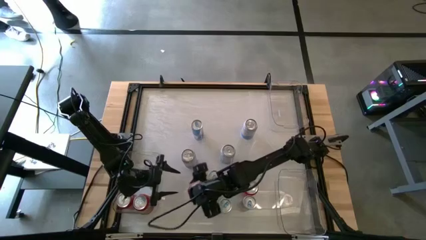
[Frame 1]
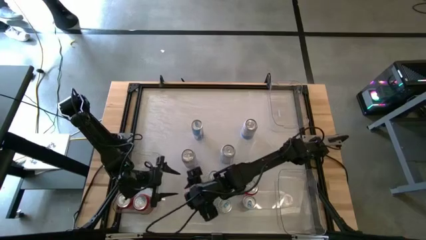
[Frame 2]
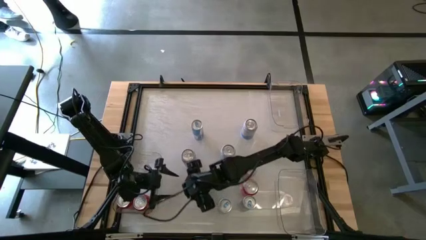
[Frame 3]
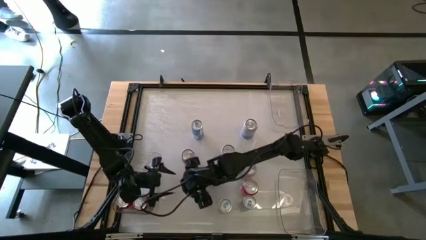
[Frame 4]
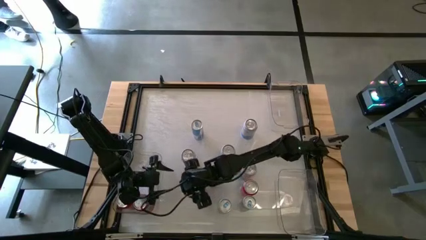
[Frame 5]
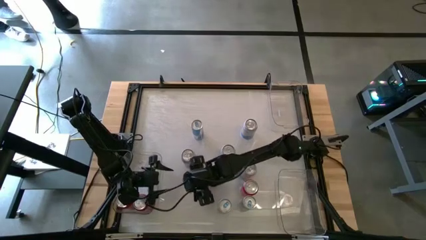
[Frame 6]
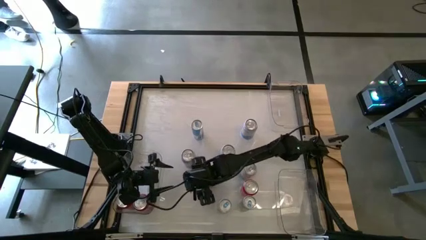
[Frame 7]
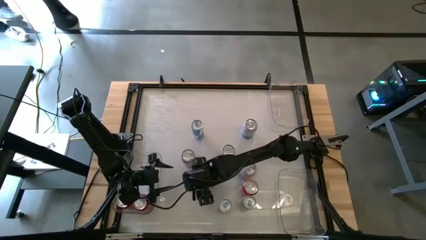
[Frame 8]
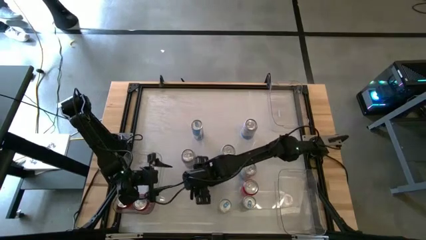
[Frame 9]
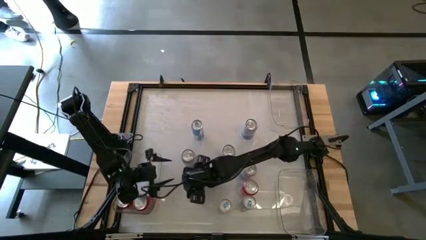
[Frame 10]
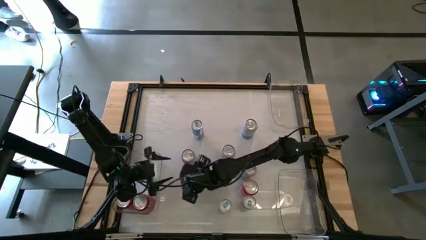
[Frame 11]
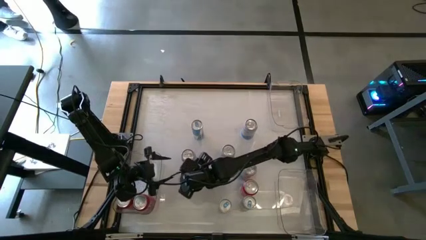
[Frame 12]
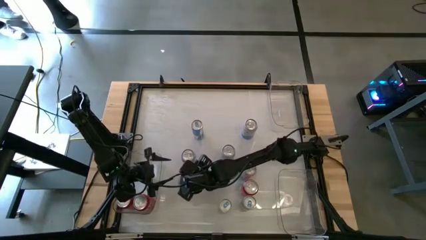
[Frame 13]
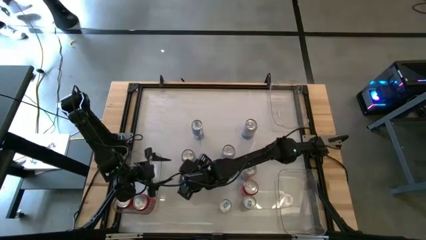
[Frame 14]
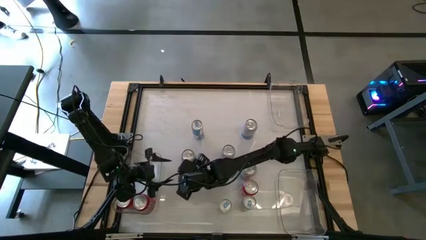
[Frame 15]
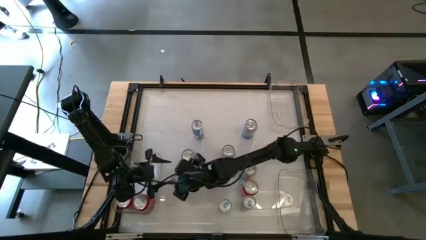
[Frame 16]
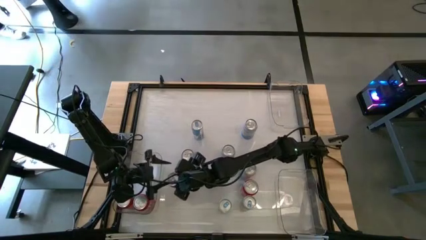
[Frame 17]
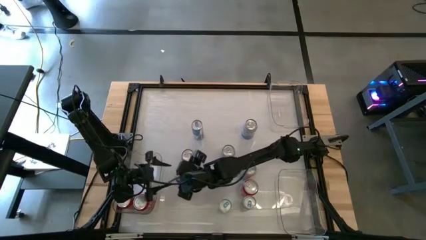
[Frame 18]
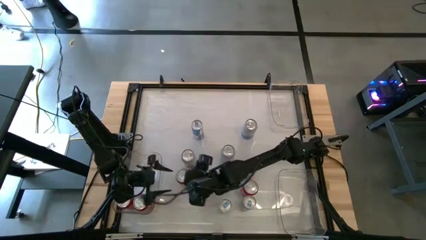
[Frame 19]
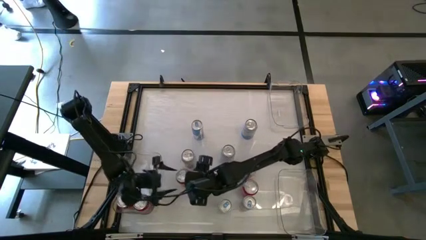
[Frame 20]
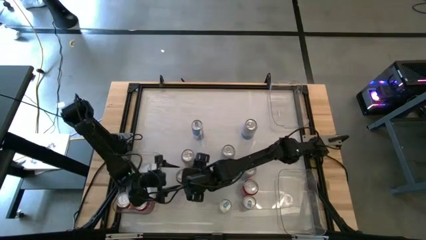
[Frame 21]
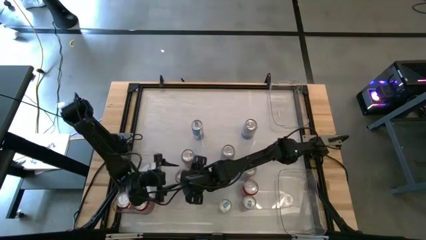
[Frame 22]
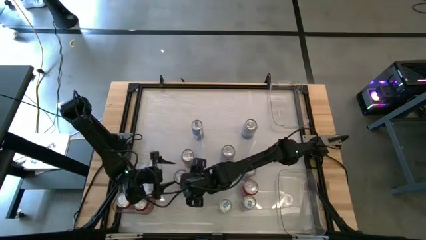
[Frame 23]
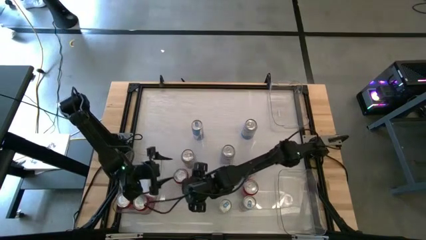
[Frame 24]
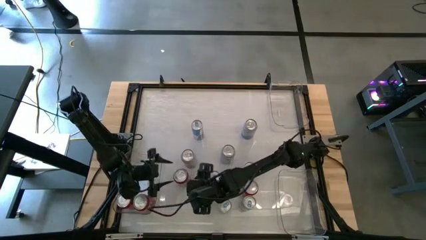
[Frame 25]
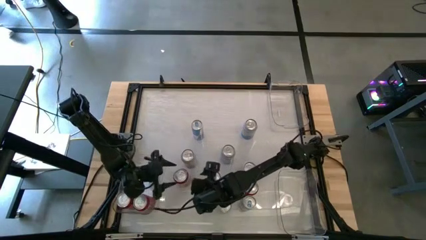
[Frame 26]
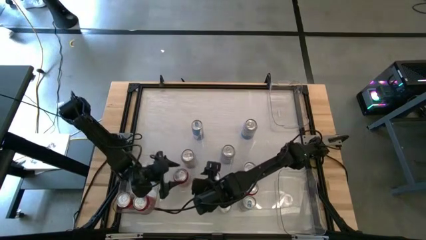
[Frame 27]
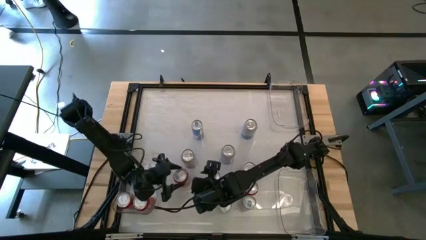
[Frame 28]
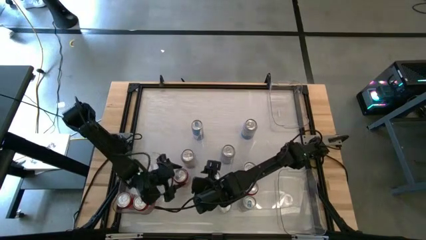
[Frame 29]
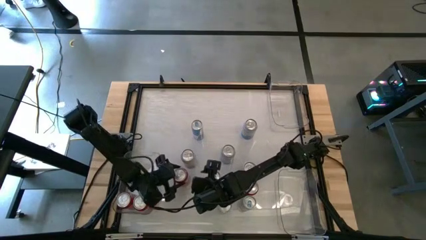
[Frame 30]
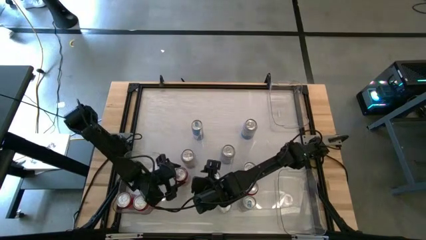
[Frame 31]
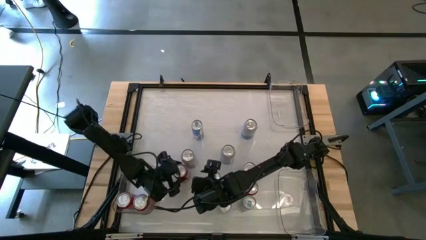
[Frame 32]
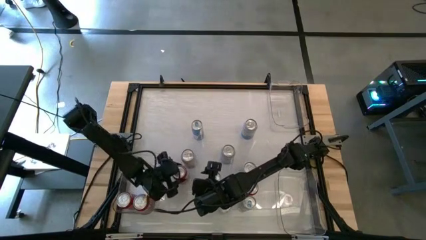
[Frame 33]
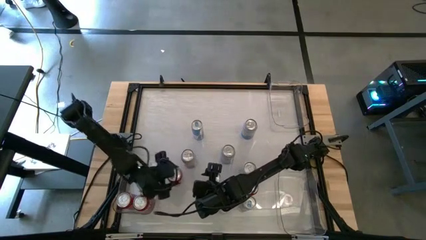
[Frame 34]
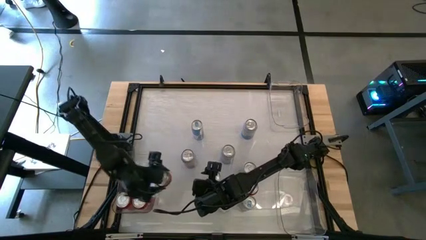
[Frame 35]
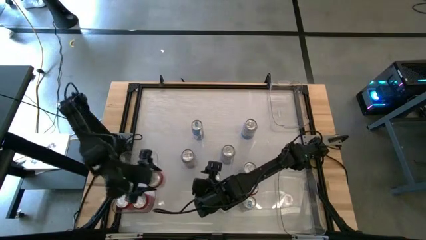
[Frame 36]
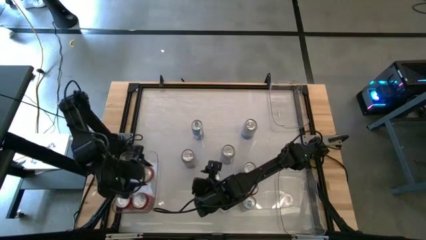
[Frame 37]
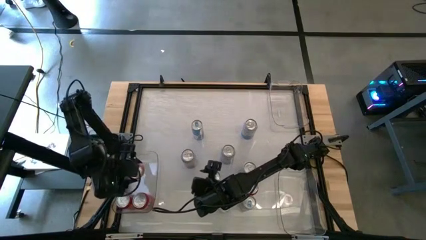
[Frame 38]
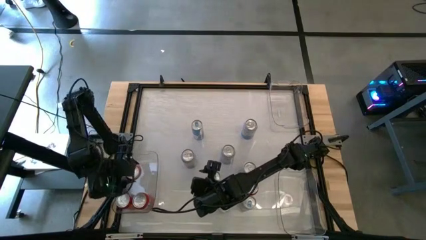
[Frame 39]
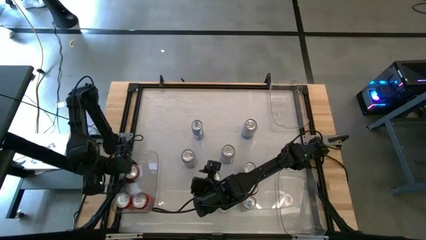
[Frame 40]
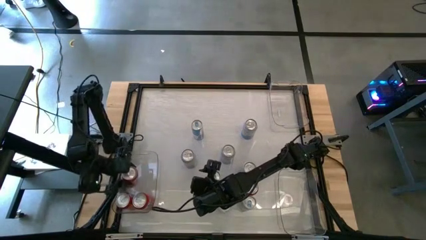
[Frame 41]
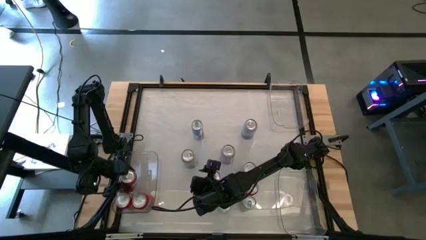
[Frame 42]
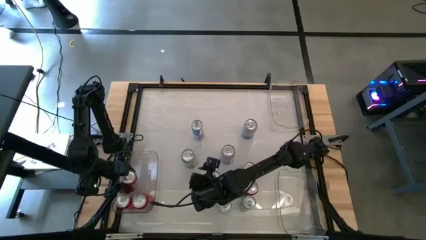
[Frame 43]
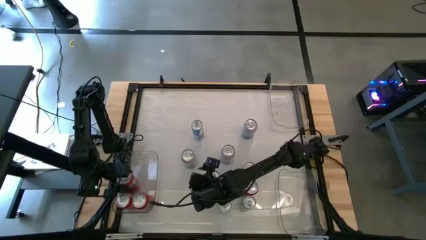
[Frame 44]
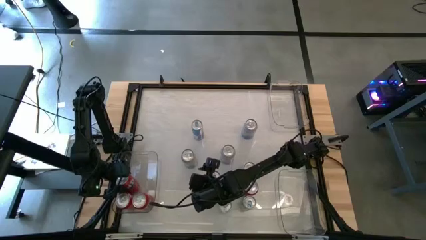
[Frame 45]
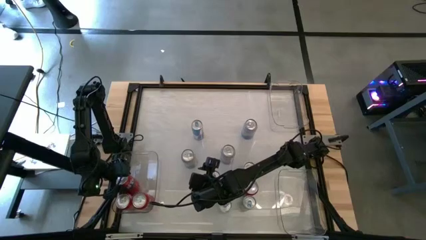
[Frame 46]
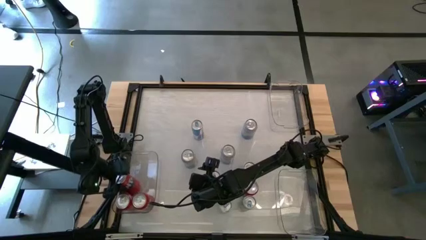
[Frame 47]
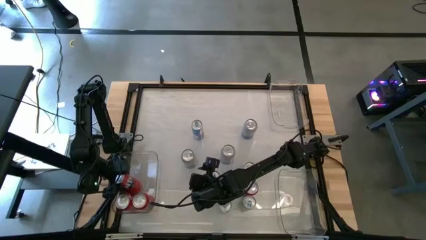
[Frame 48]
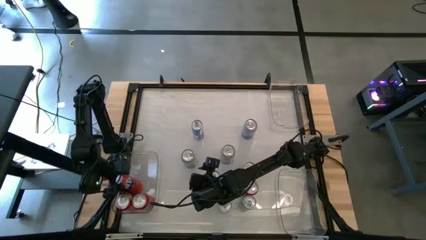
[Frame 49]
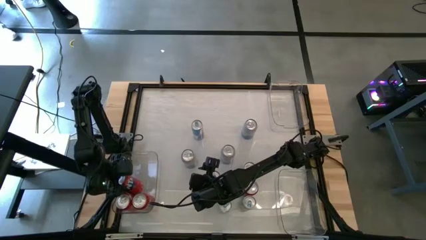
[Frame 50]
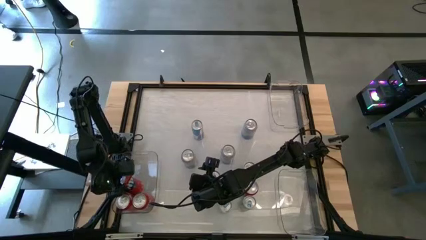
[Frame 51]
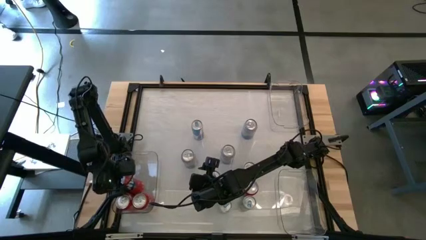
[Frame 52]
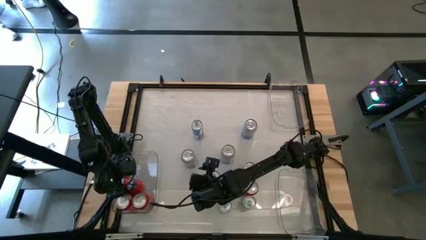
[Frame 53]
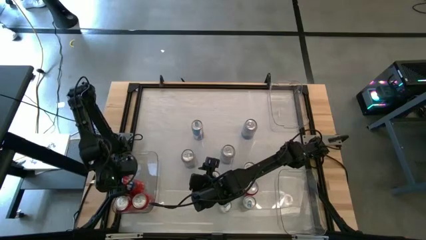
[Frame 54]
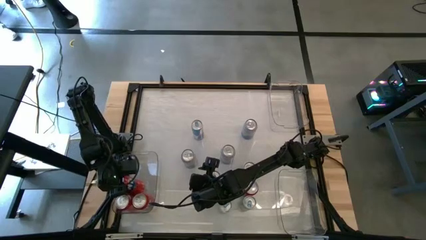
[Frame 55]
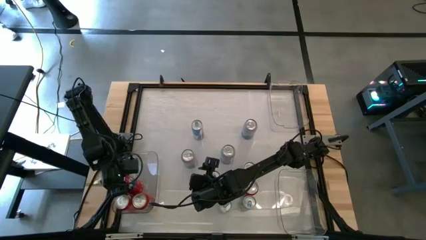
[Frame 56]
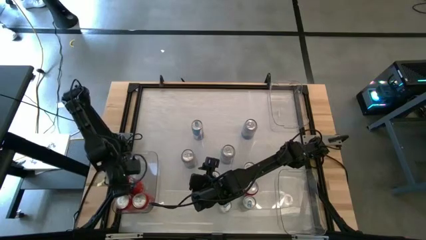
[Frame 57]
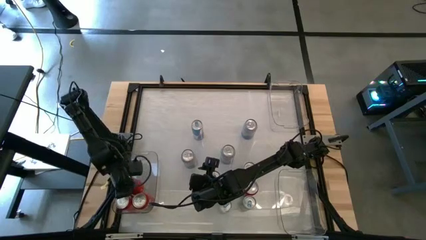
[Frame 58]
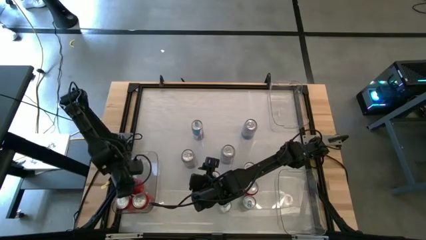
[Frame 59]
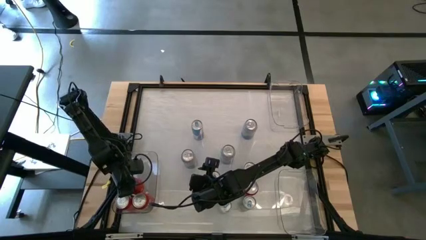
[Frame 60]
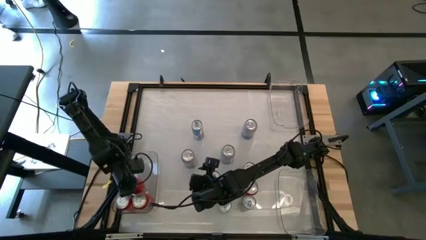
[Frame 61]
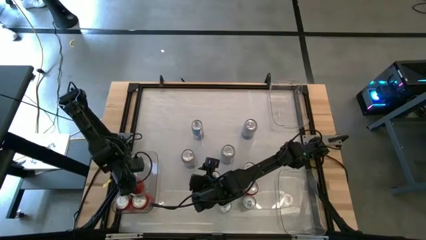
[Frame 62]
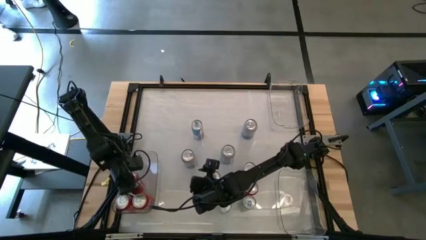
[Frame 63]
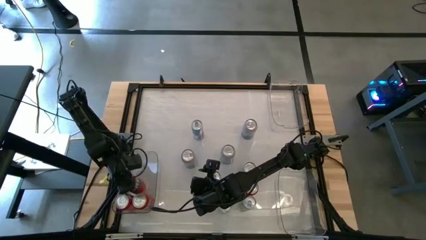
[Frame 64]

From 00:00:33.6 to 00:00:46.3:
Task: Sort soda cans
Put the middle right red soda can into the left transparent bin

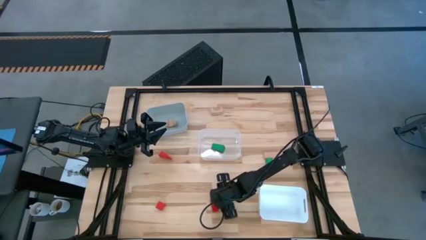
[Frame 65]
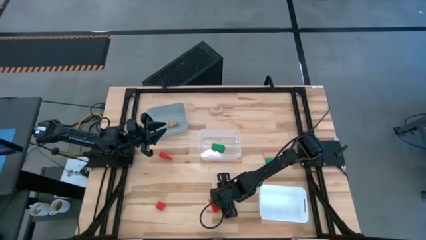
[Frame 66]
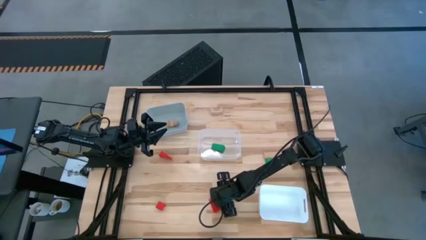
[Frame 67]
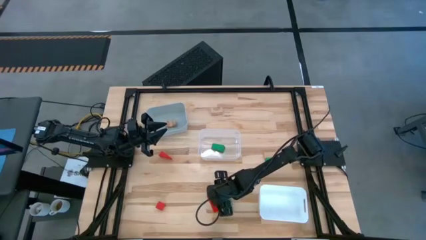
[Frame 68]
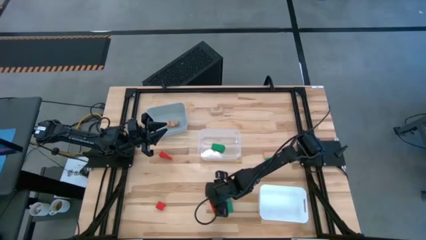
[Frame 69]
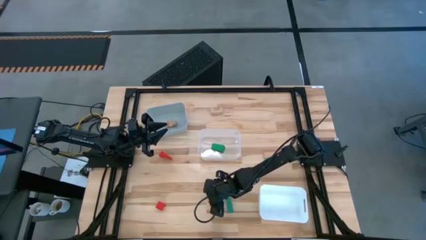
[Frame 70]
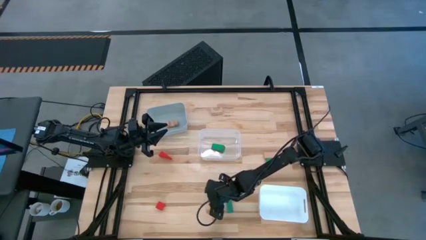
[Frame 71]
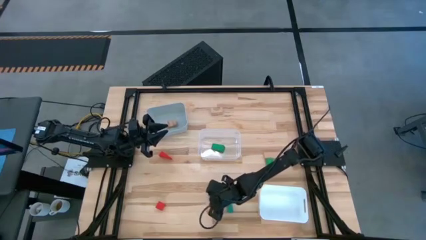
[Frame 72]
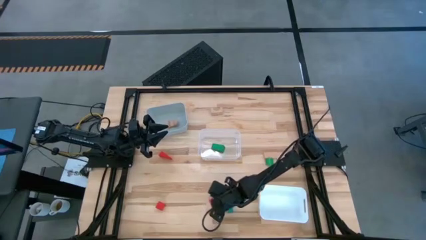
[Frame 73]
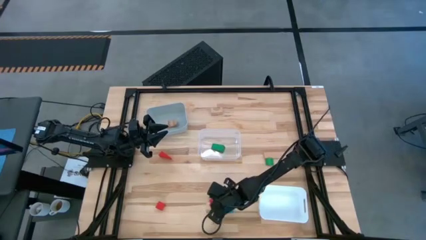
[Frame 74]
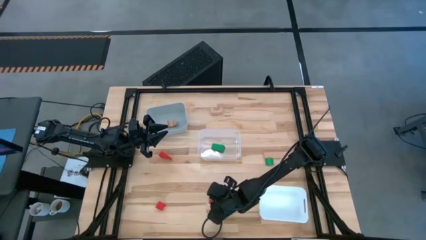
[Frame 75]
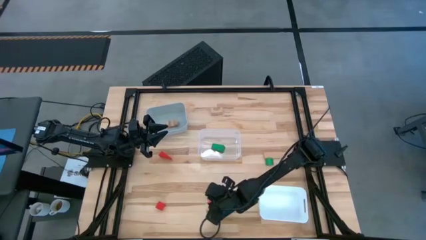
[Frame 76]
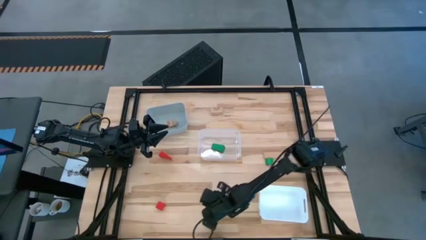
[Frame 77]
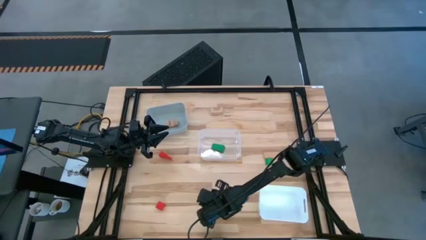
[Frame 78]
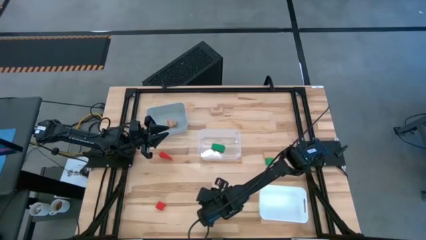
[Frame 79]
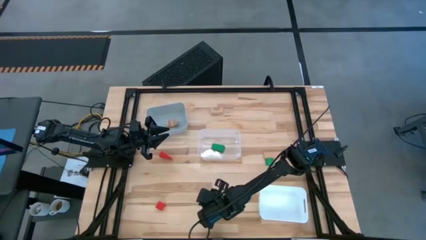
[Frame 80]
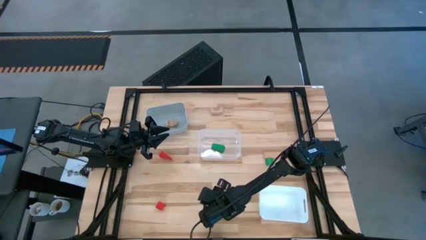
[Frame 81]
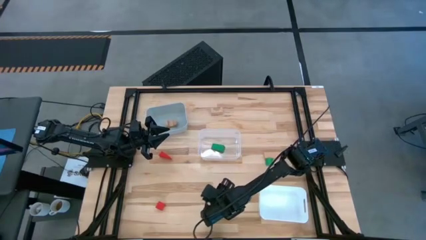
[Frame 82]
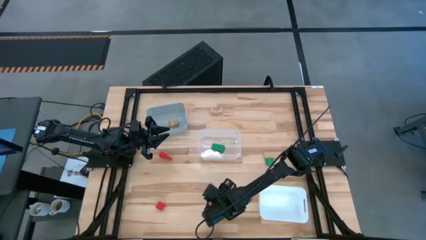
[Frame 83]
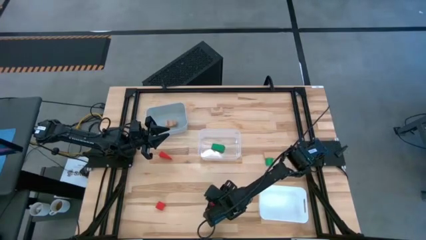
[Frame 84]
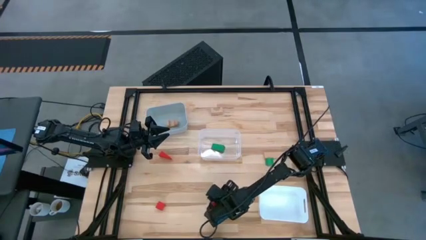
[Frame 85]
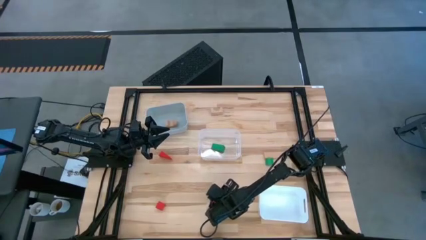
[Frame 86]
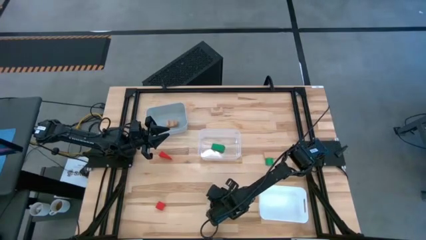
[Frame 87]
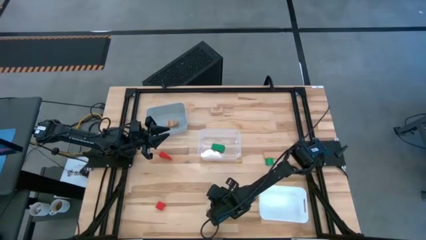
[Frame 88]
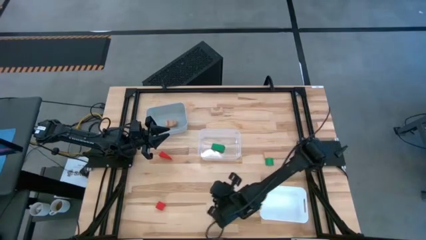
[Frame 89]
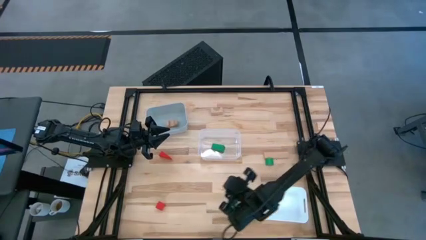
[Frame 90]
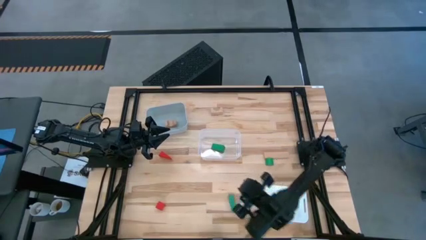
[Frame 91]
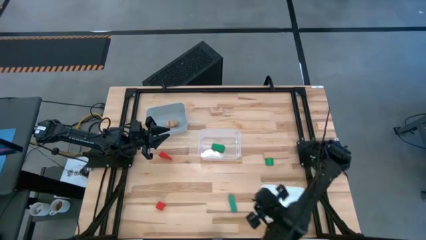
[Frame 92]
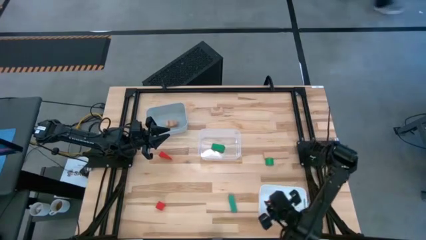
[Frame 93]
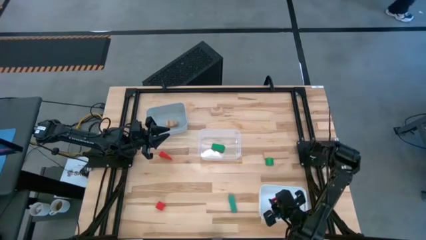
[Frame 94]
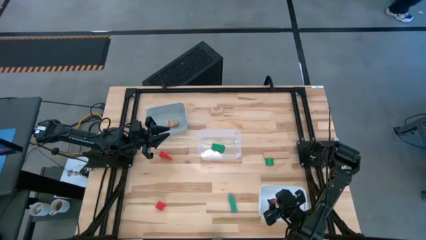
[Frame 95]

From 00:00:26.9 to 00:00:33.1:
Task: Sort & place blocks by color
Put the bottom right red block into the white bin
